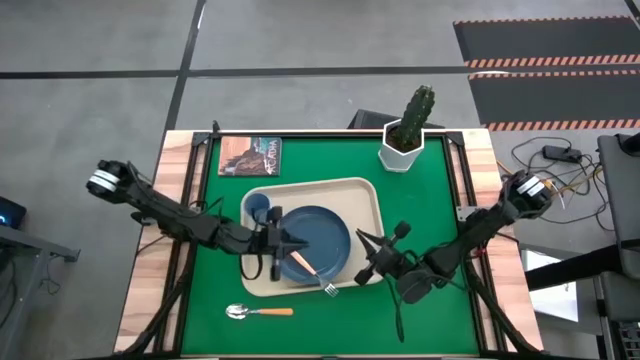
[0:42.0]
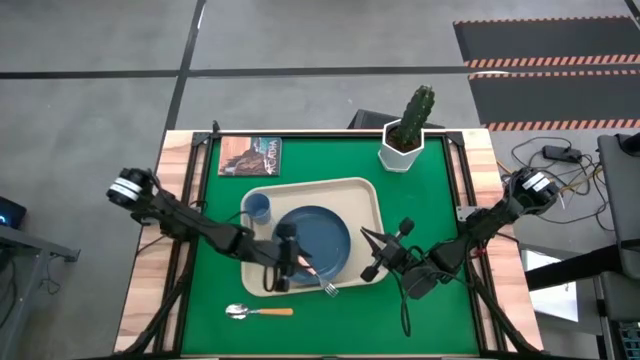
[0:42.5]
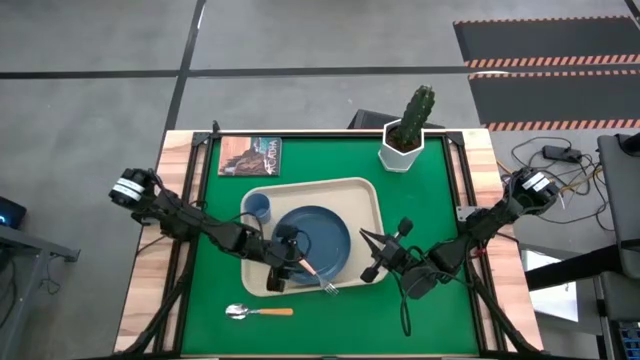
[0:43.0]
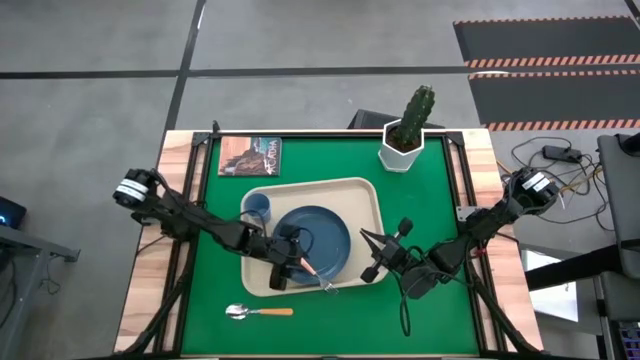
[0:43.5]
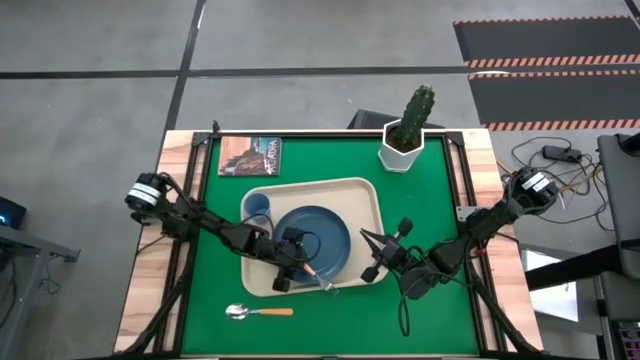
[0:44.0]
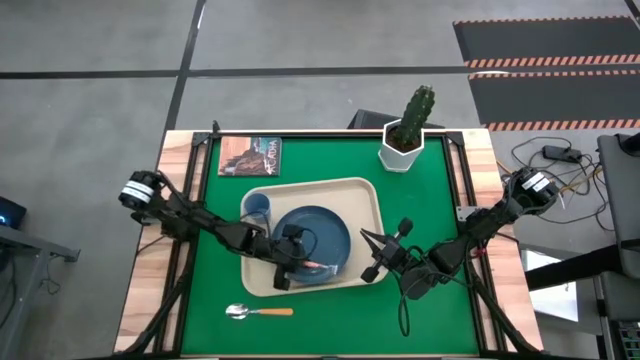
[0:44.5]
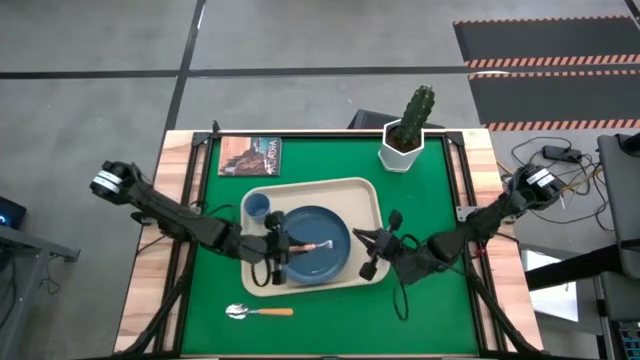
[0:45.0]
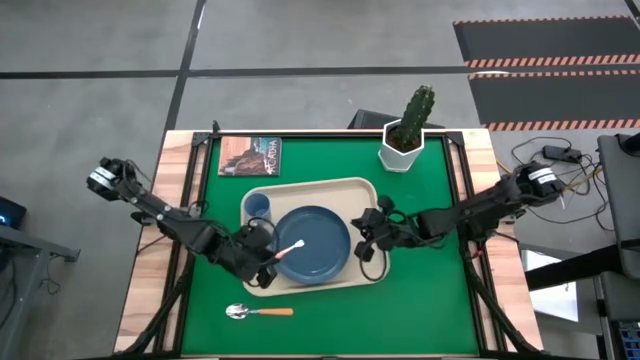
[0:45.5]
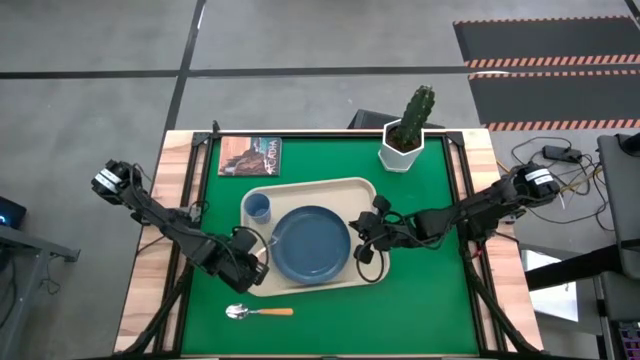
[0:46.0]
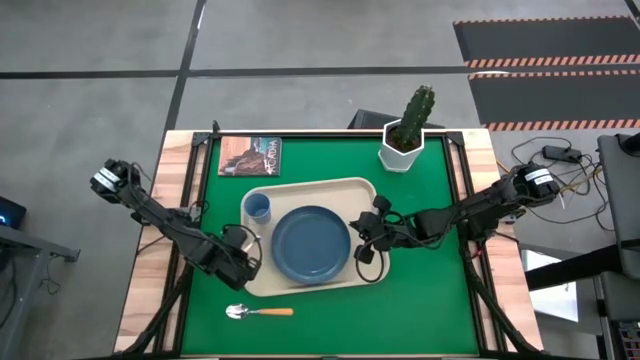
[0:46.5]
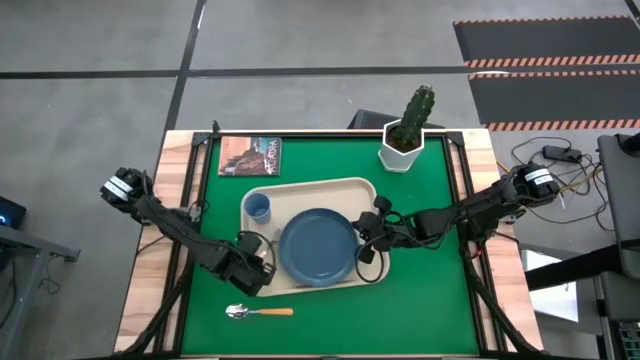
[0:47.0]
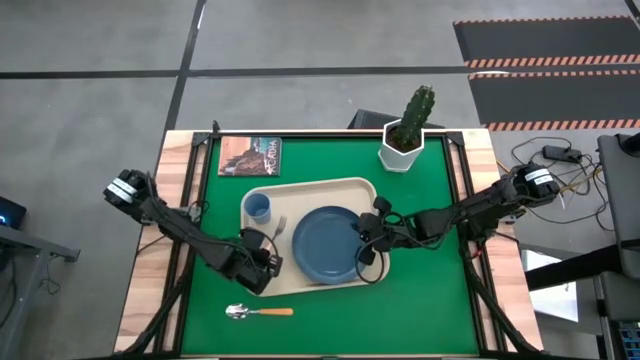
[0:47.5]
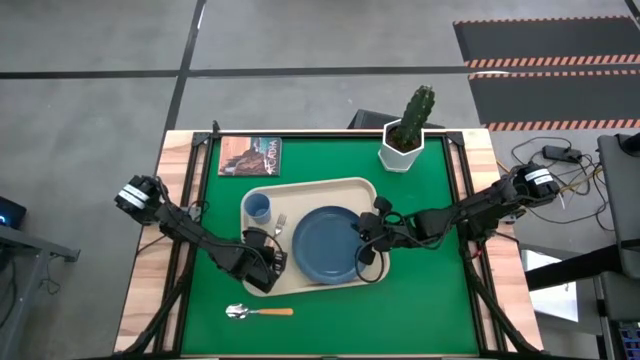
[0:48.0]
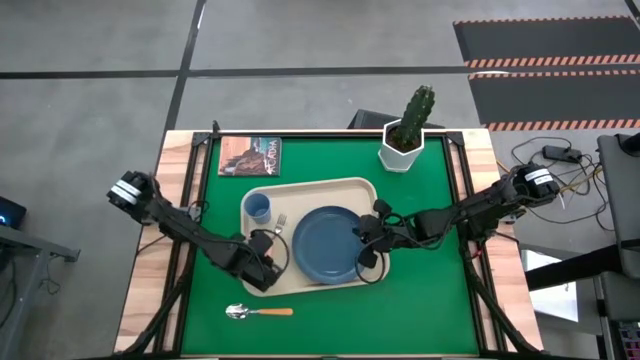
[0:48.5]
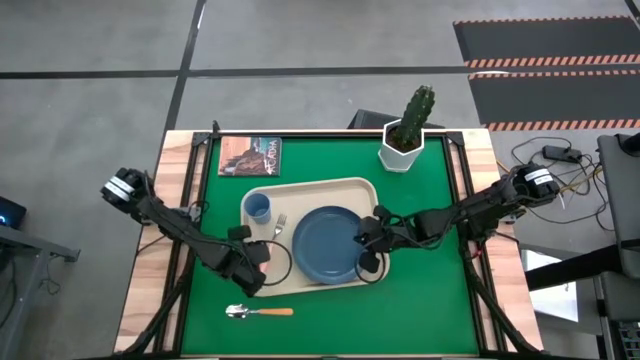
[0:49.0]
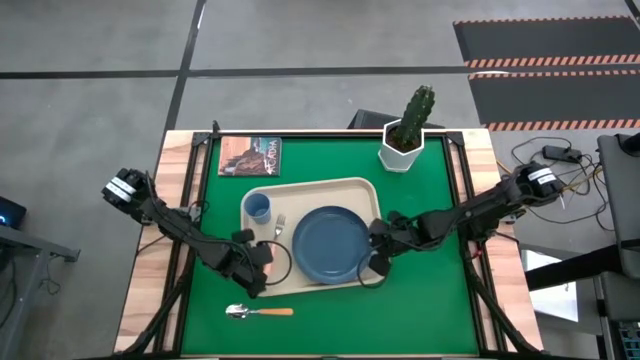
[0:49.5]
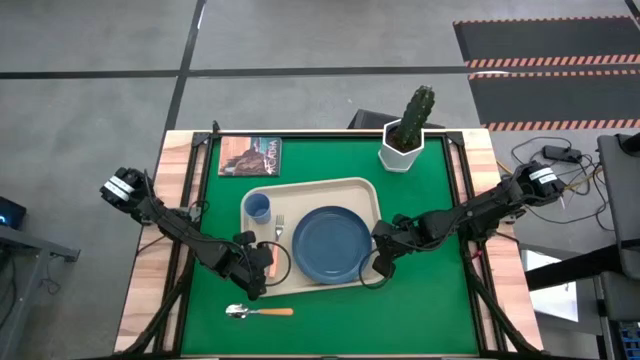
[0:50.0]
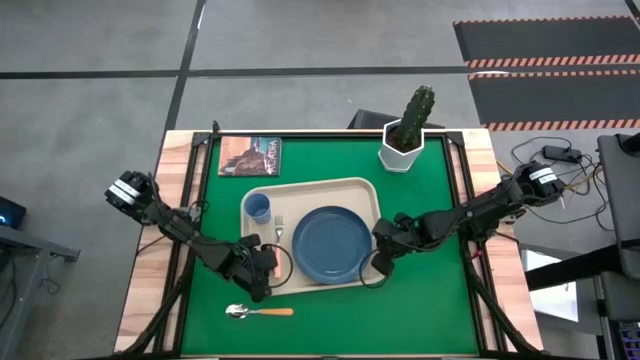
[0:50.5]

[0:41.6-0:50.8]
Task: Pick and place plate/cup/fork/spoon on tray
Put the orange fork on the white serving tray on the left of the blue plate

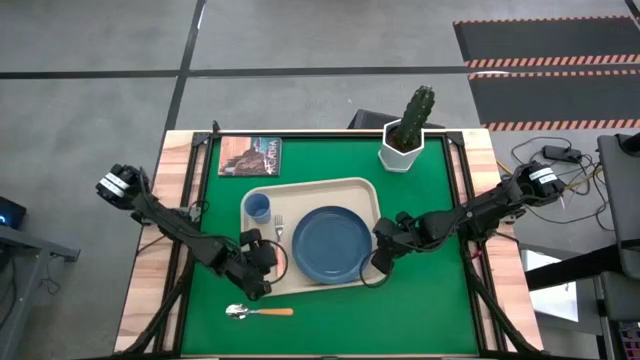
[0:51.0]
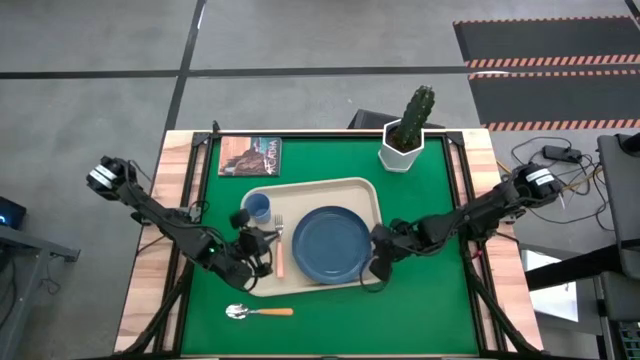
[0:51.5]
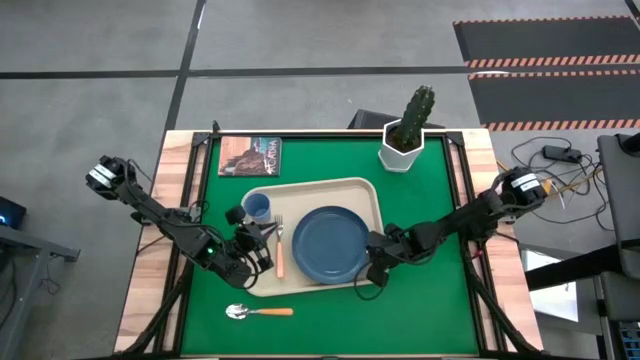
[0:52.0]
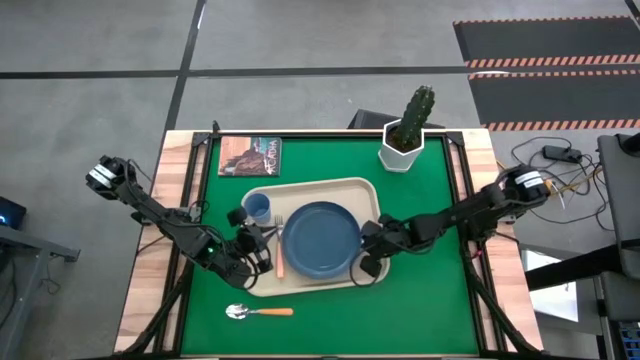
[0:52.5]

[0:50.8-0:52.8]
Adjust the blue plate on the white serving tray

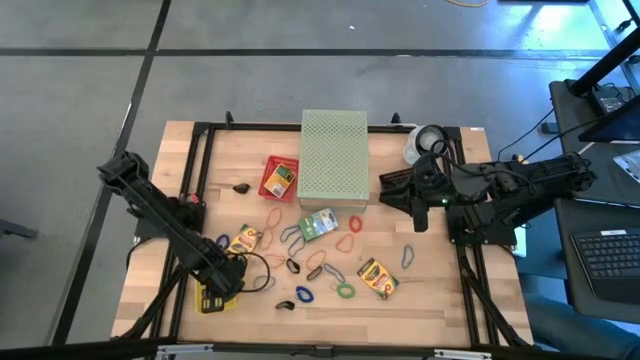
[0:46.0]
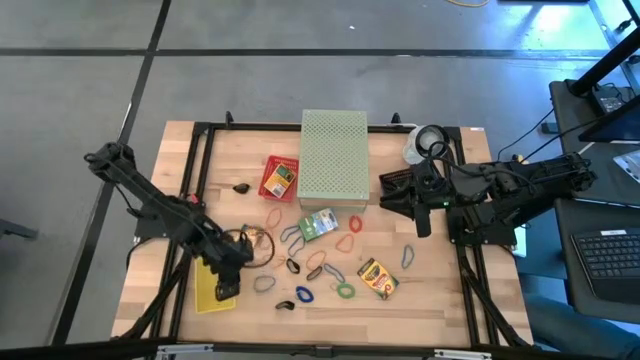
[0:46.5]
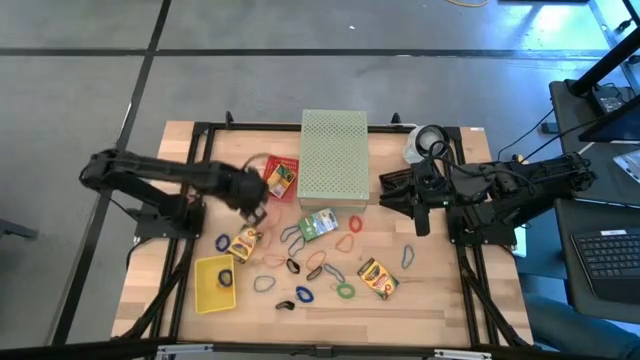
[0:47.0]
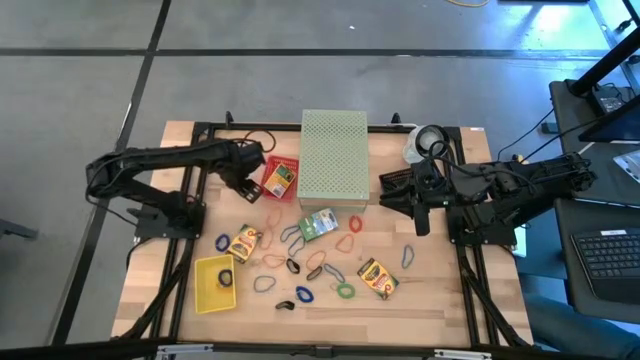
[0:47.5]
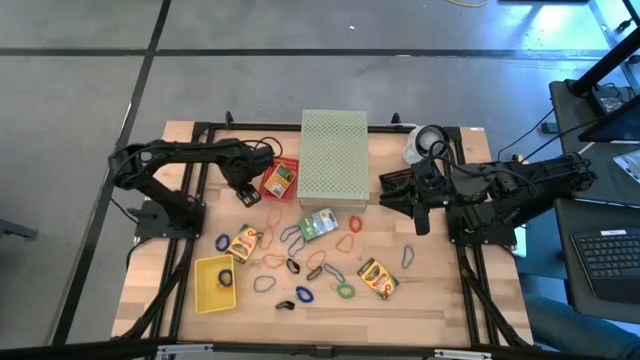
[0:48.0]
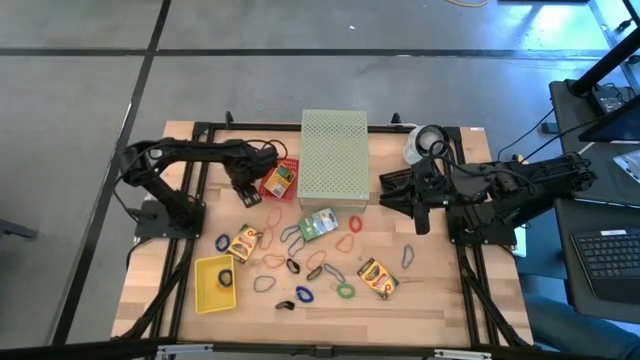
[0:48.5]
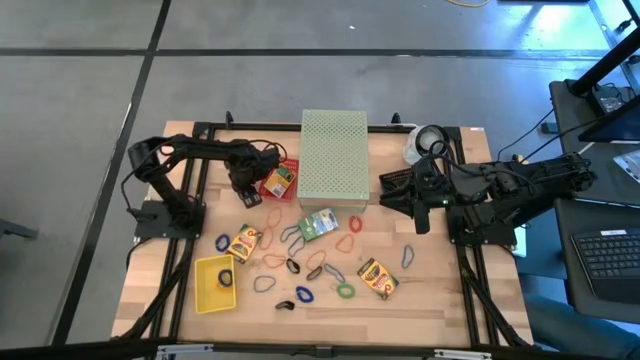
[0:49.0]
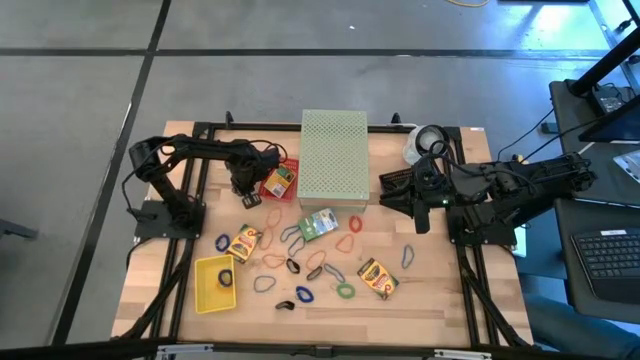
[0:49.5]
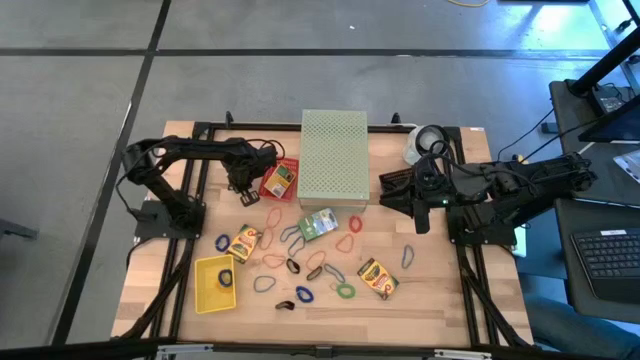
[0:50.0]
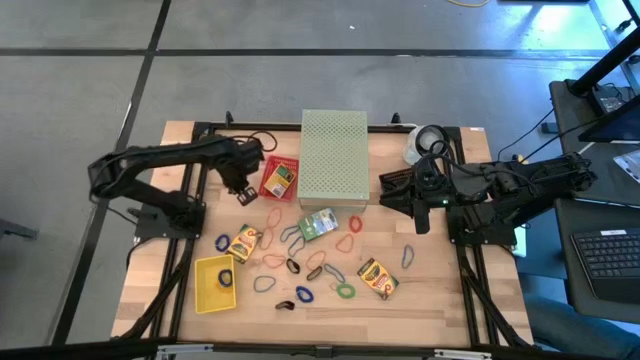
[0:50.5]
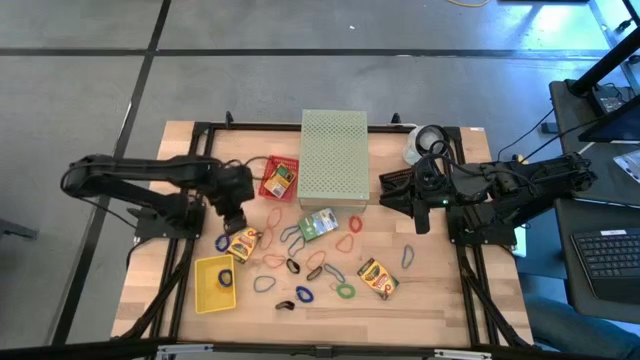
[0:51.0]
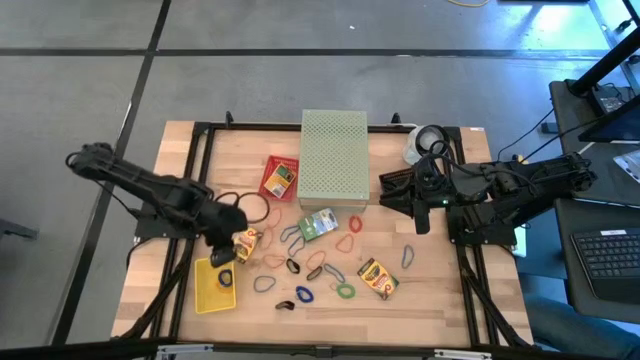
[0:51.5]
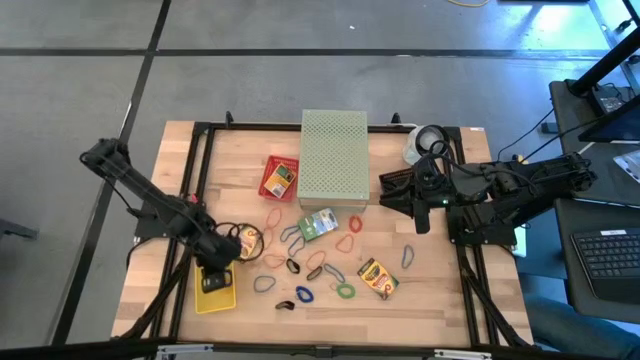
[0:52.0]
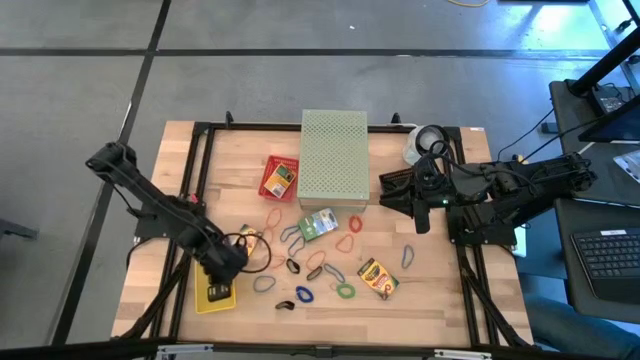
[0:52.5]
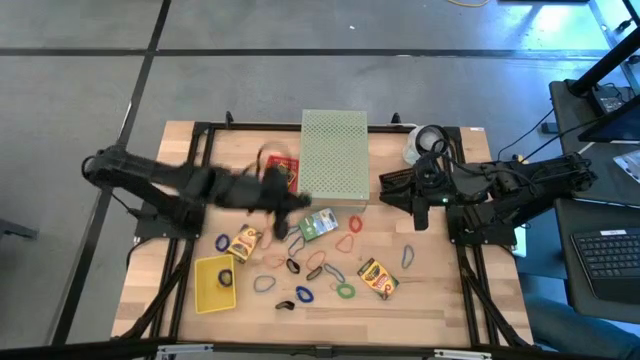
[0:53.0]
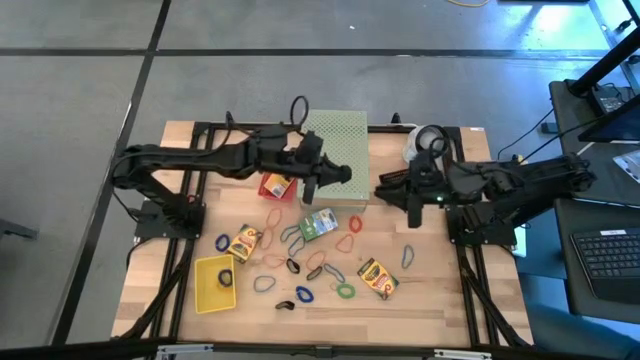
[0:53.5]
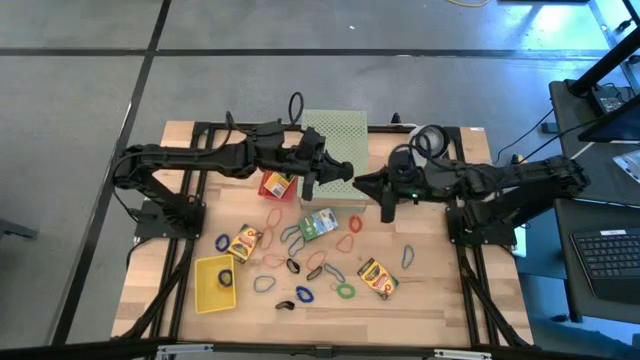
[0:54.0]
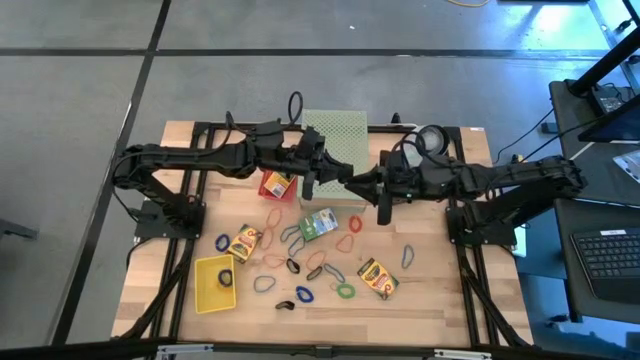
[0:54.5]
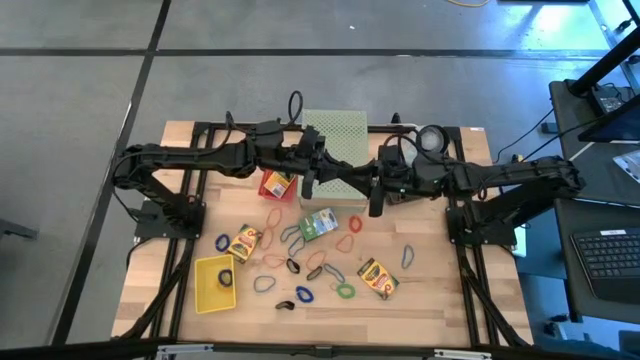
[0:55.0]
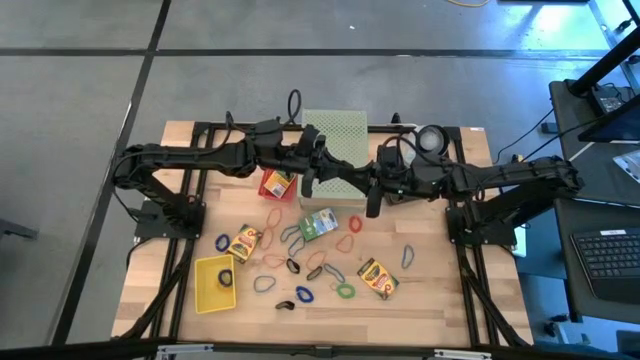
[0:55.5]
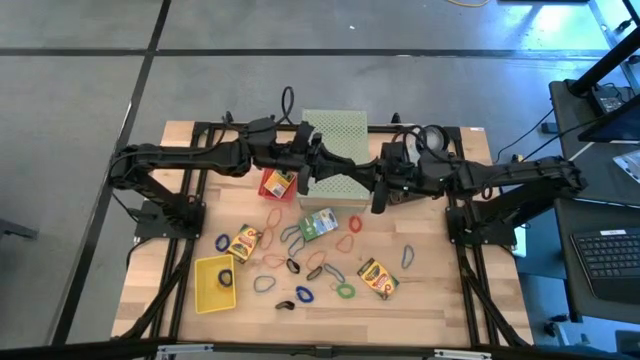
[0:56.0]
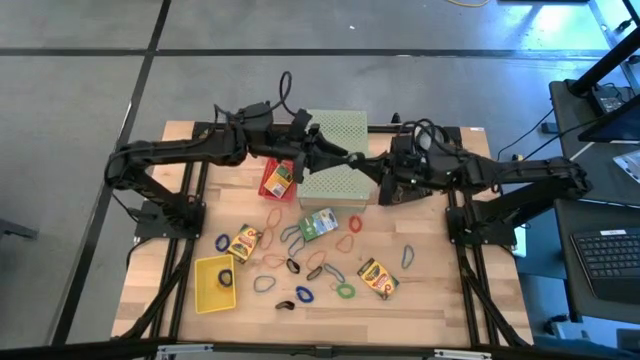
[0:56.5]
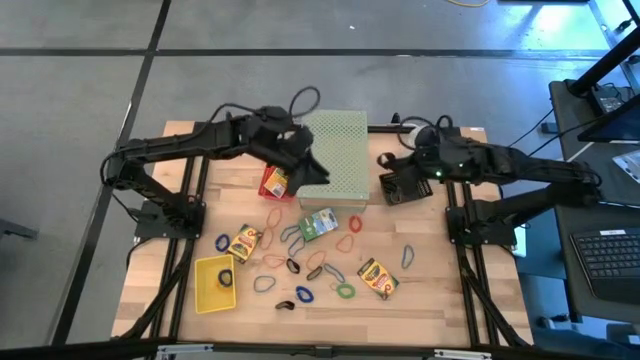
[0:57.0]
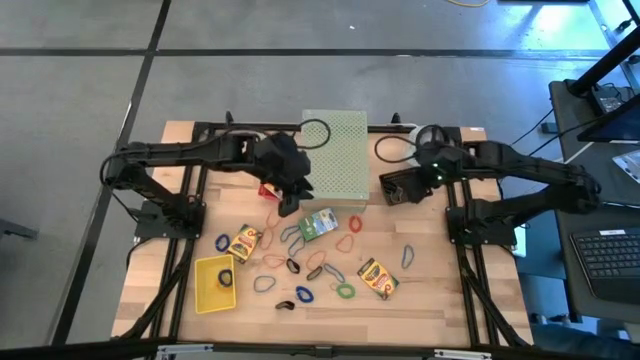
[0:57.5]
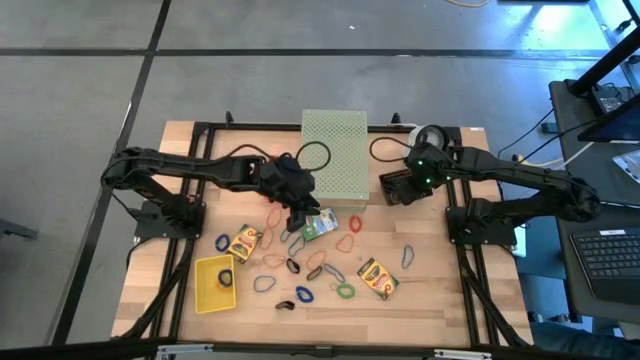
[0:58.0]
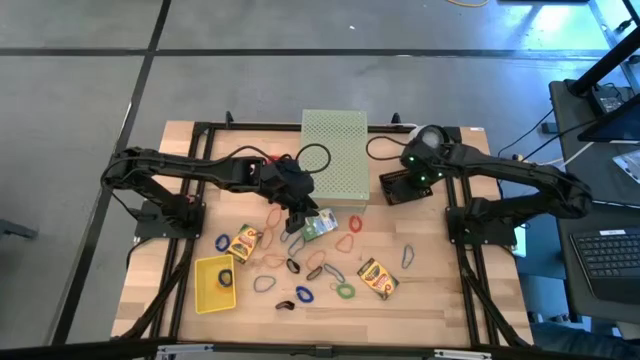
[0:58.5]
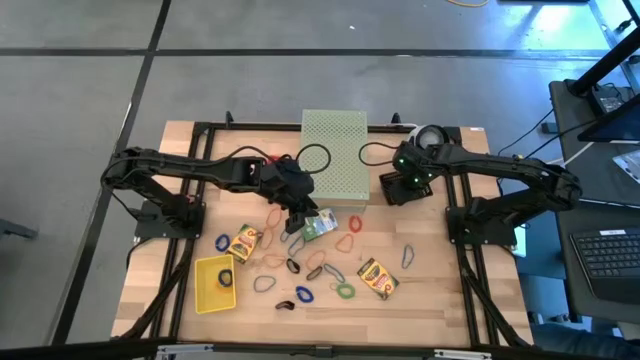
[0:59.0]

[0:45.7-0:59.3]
Task: Pick & Place Office Desk Supplies
Put the black rubber band into the black bin
